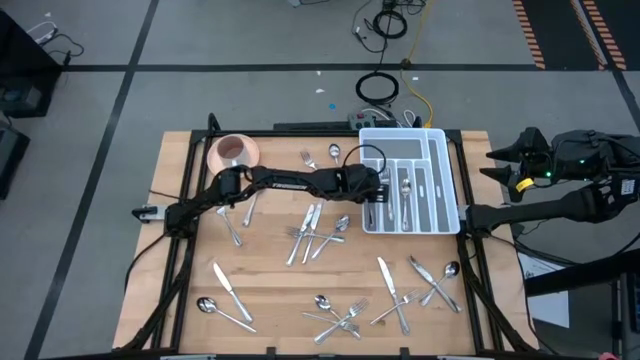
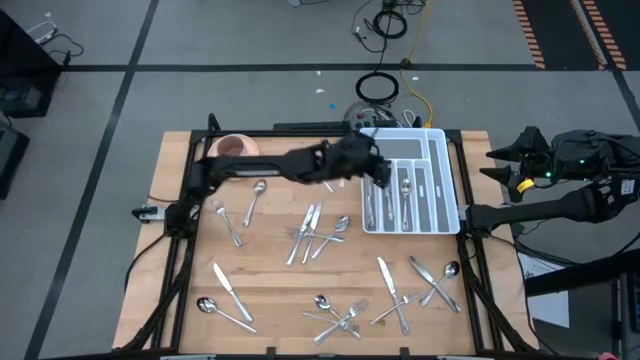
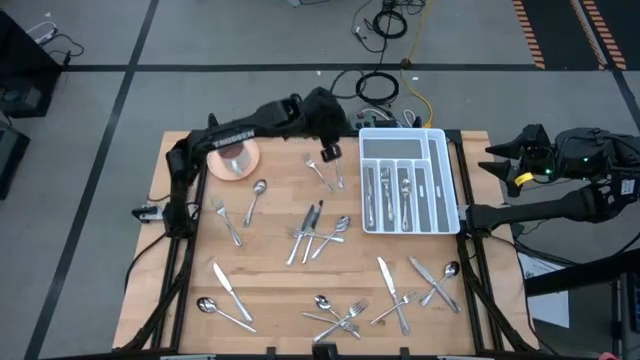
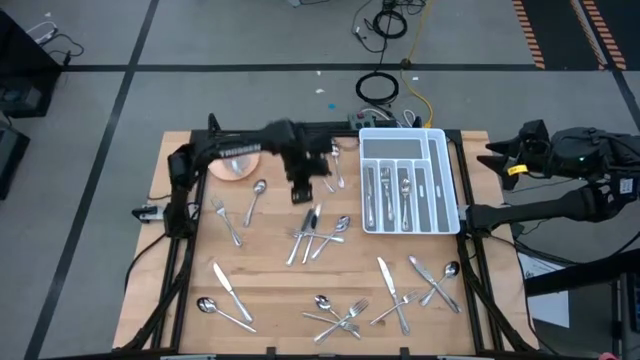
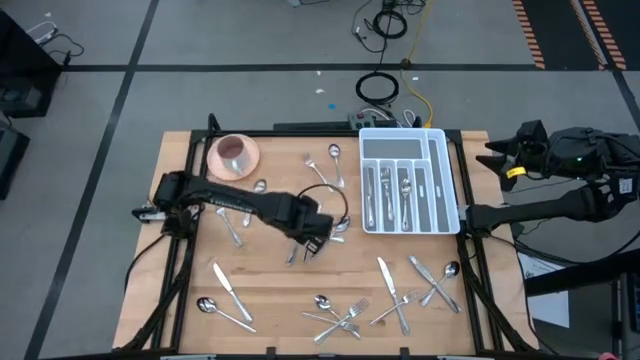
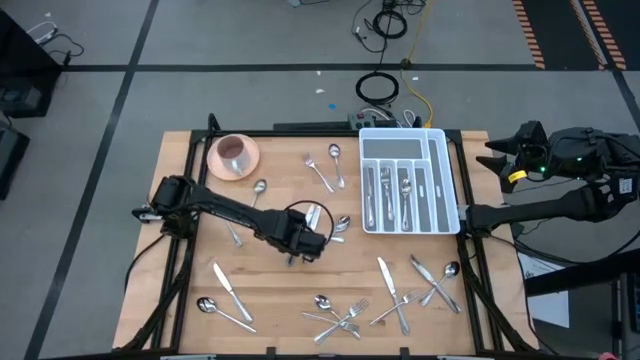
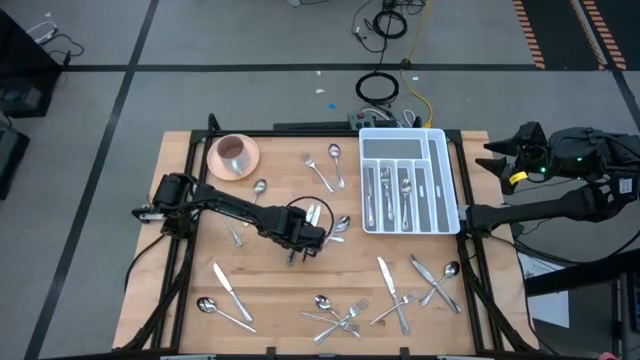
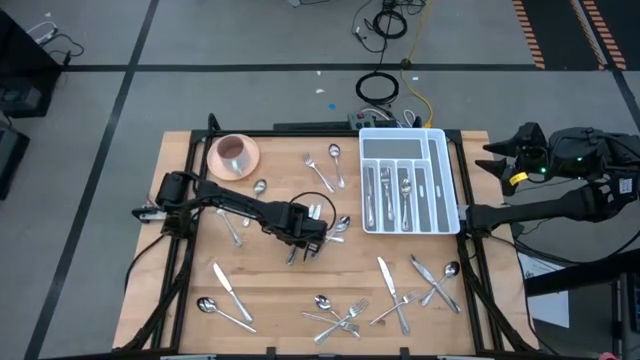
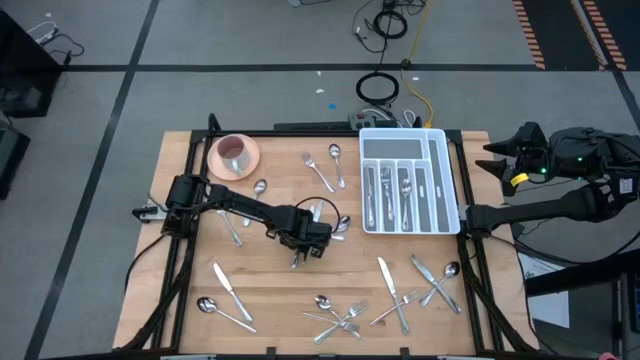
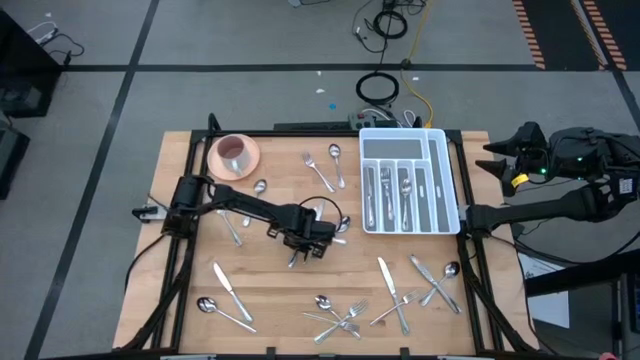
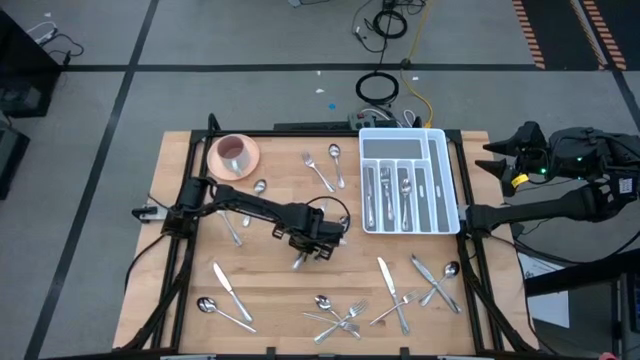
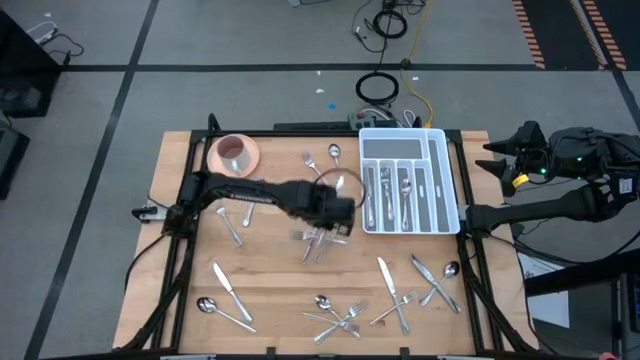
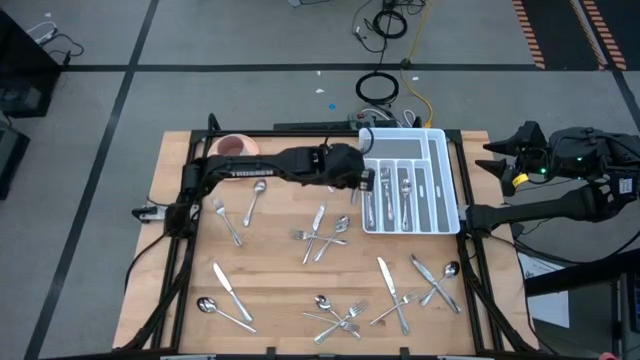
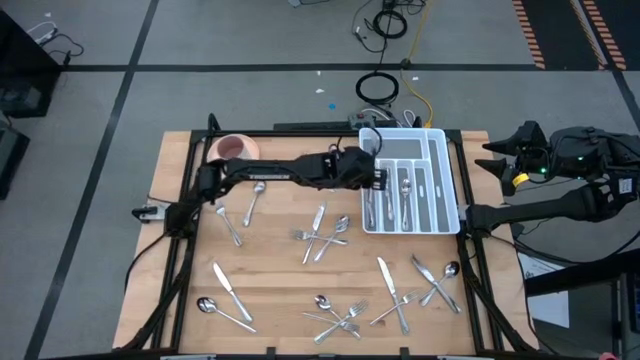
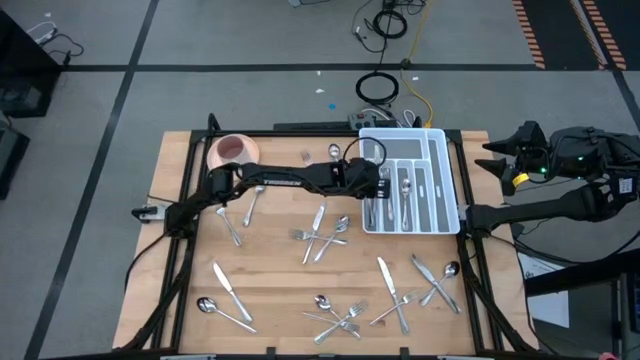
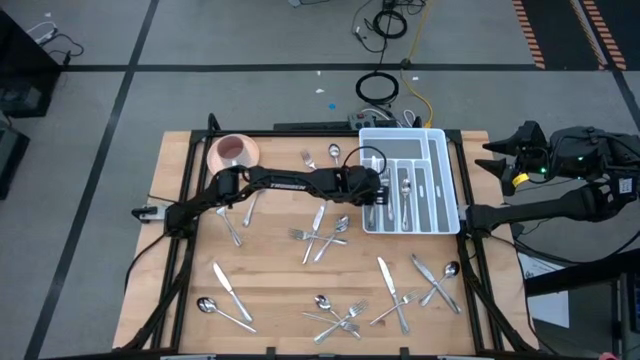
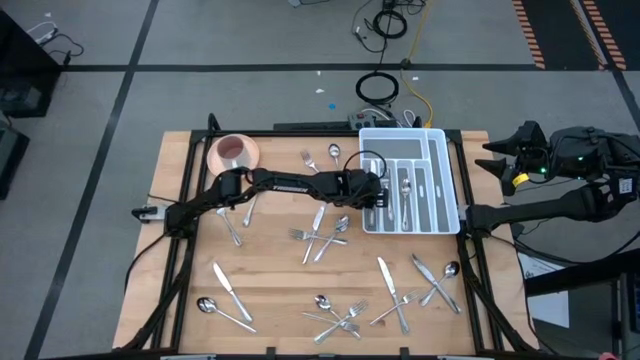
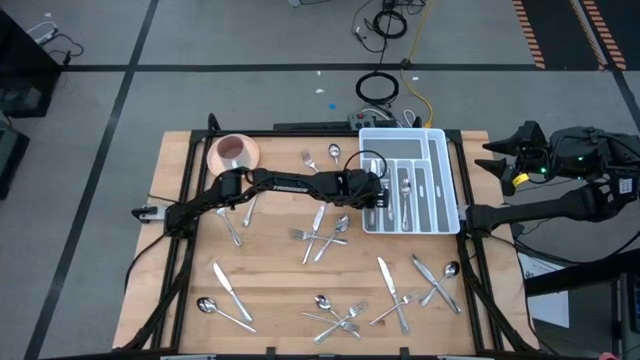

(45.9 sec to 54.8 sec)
Task: Sort silverware
Put the silver knife into the white cutlery tray

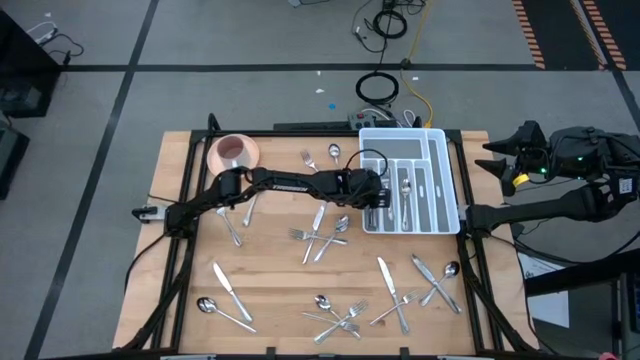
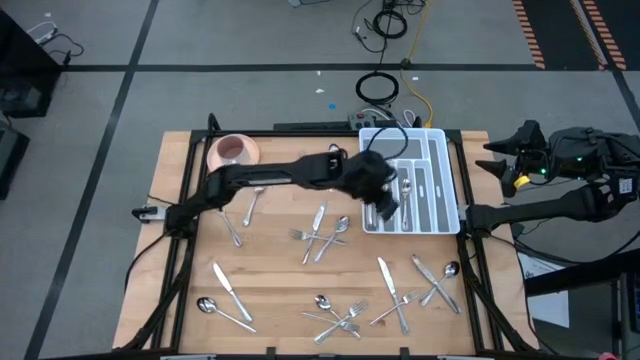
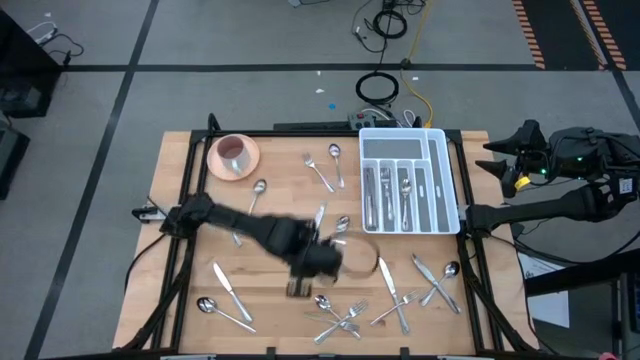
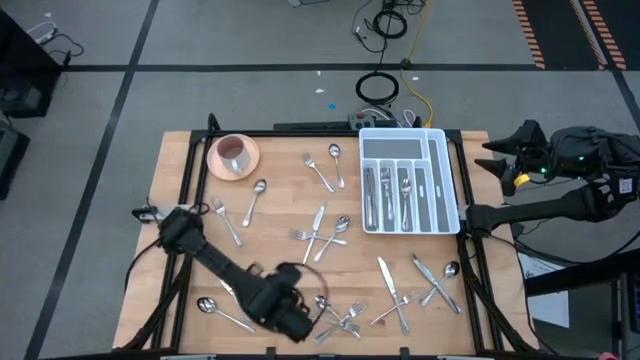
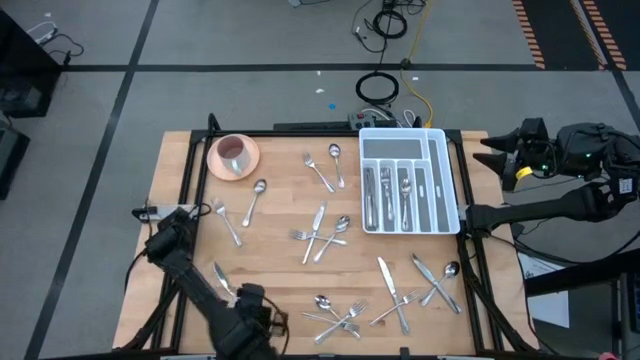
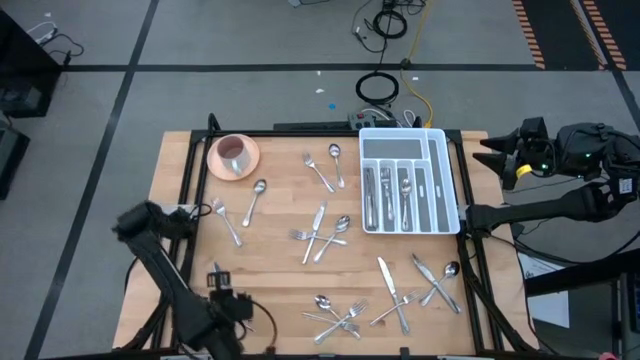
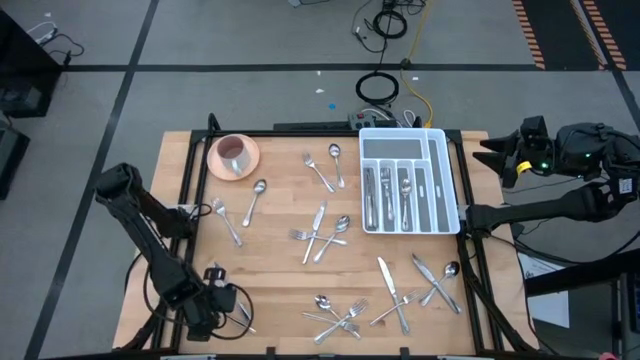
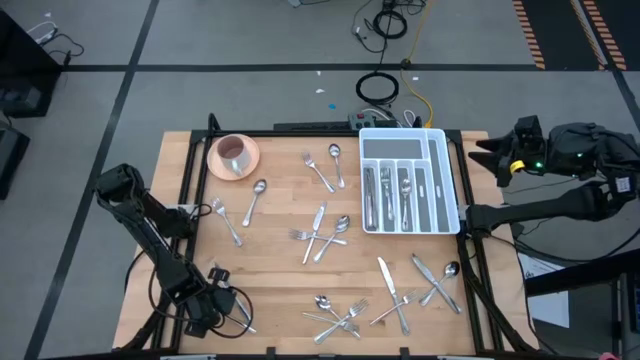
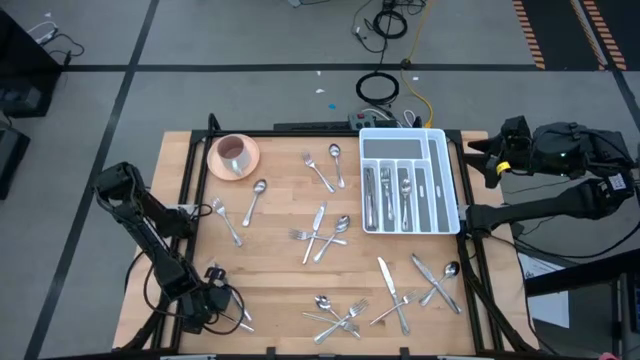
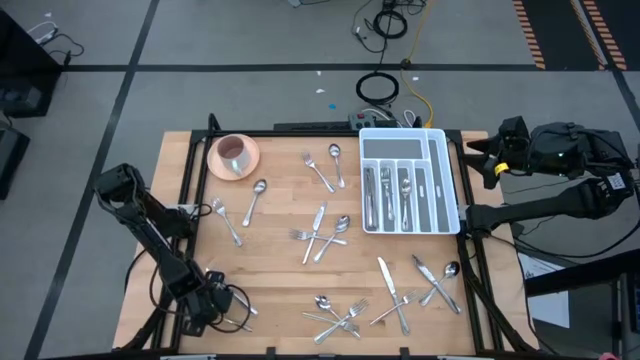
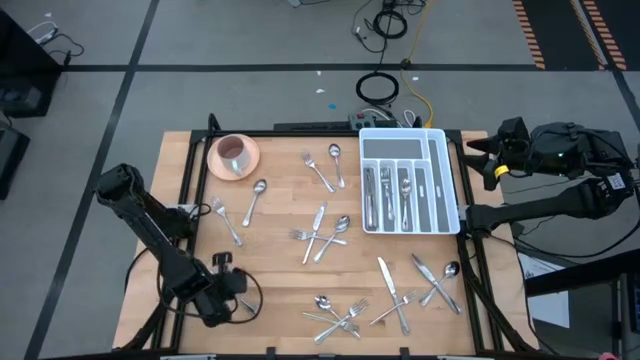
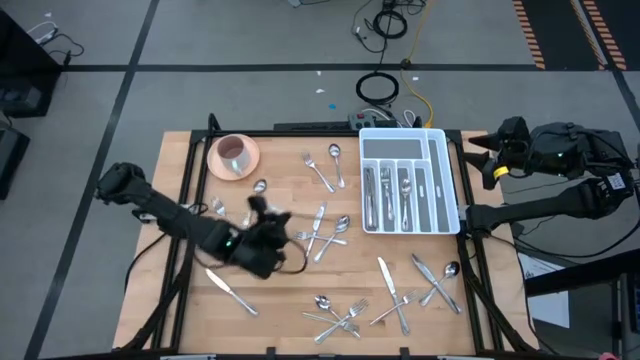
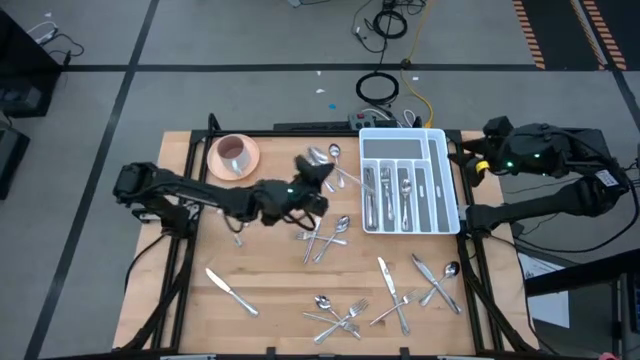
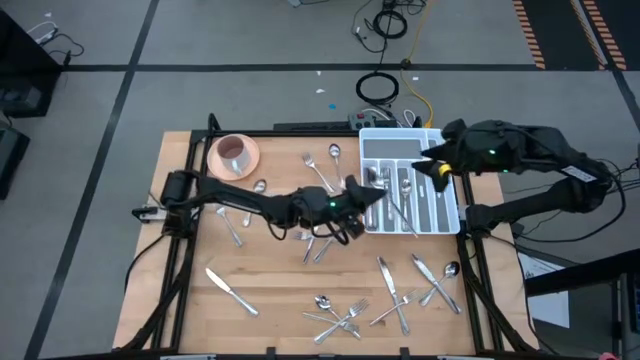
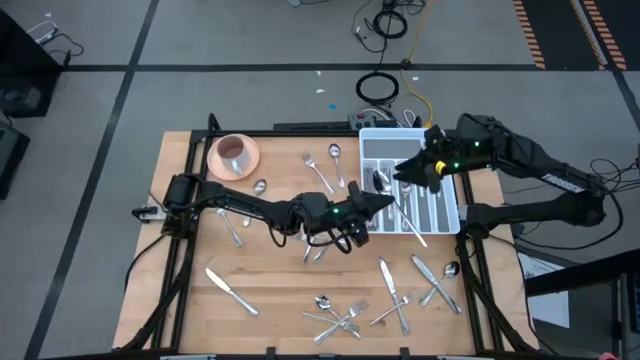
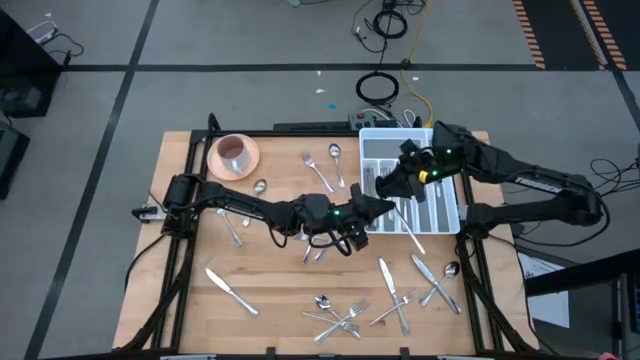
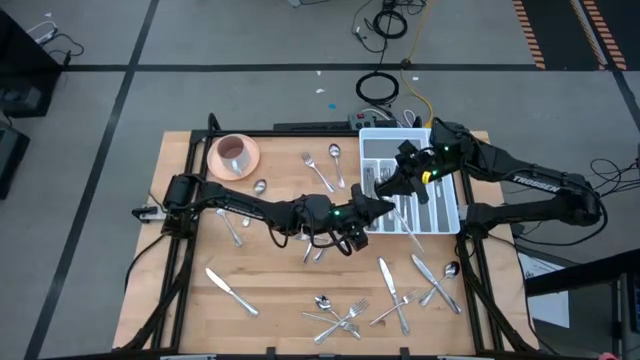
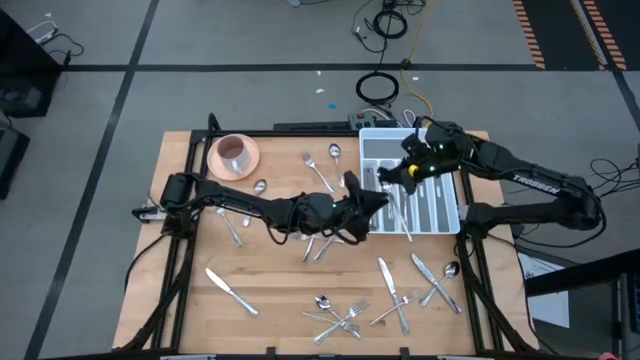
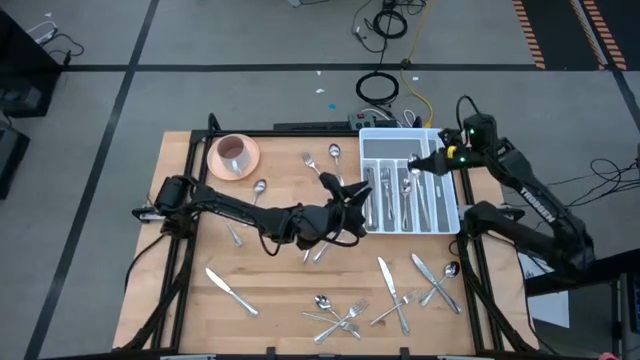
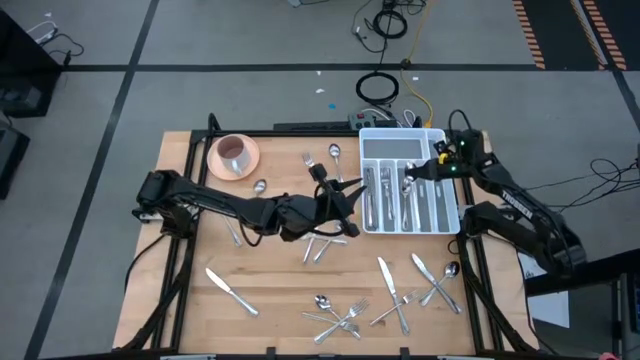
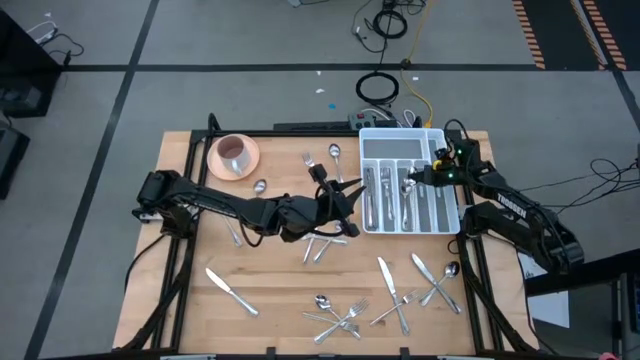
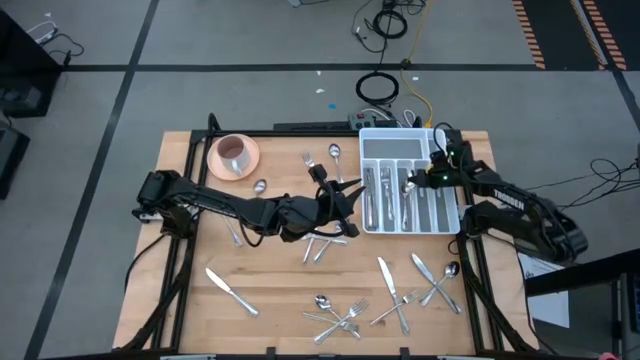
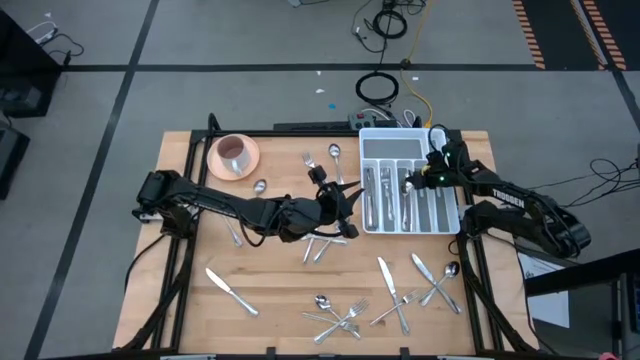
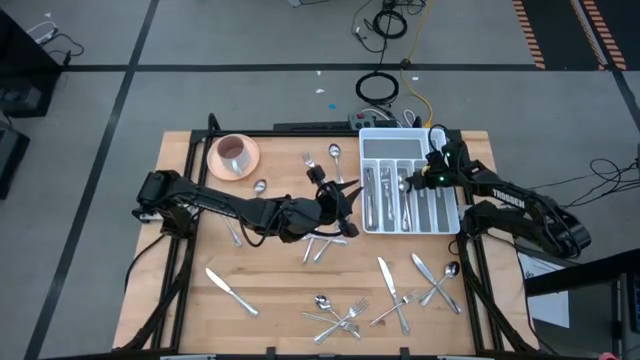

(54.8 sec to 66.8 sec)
Put the silver spoon into the white cutlery tray
